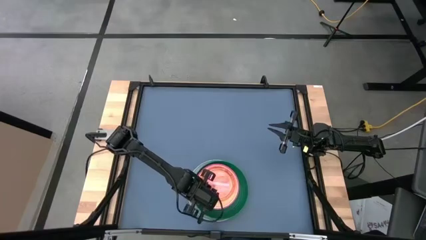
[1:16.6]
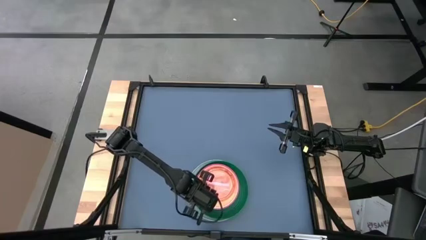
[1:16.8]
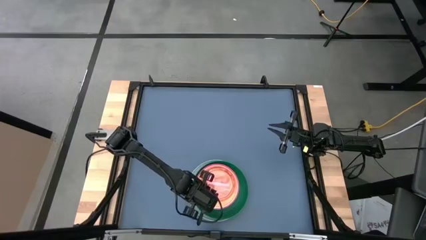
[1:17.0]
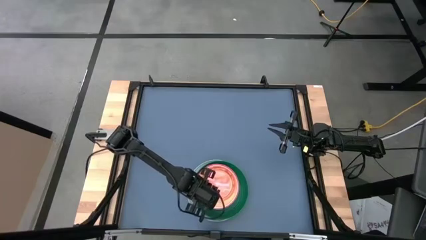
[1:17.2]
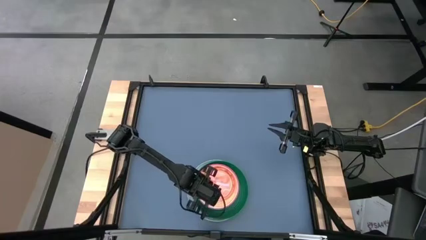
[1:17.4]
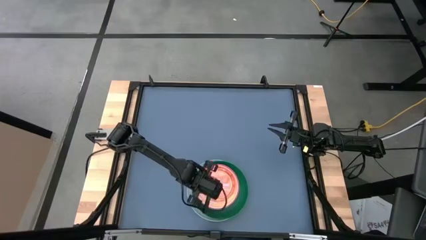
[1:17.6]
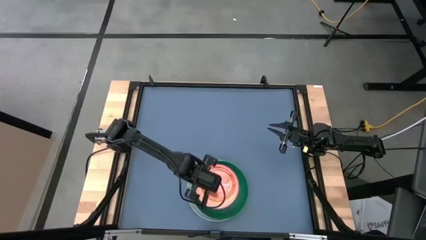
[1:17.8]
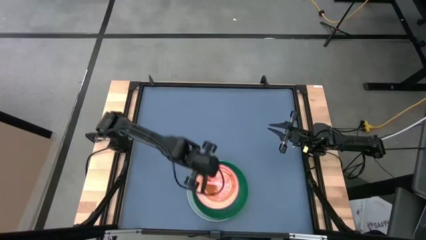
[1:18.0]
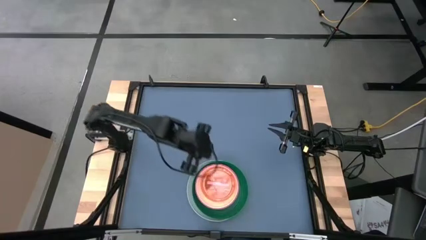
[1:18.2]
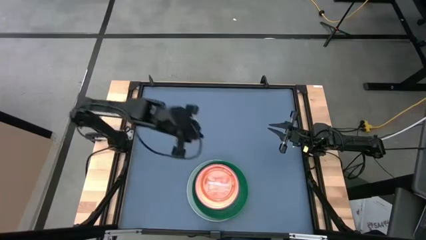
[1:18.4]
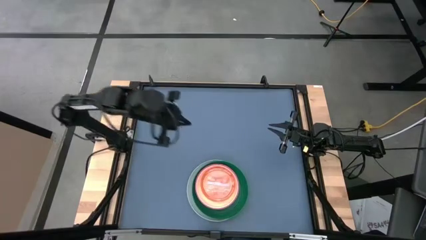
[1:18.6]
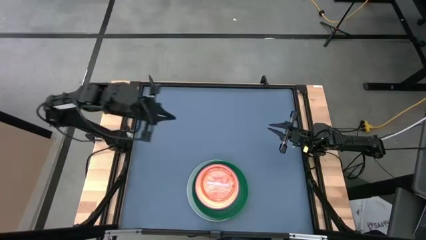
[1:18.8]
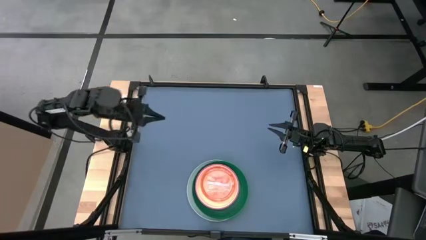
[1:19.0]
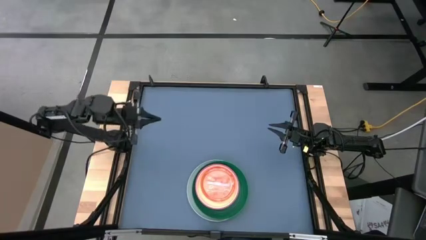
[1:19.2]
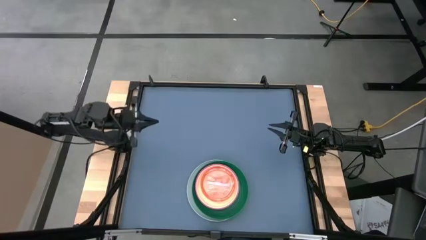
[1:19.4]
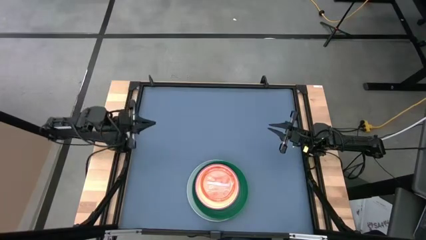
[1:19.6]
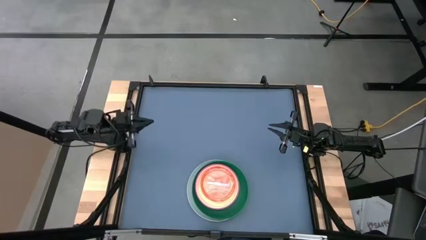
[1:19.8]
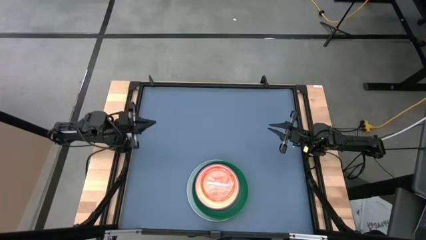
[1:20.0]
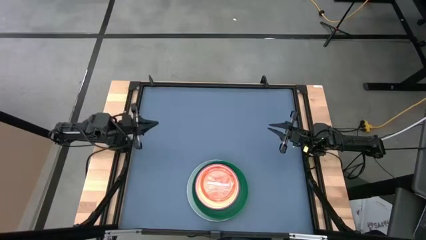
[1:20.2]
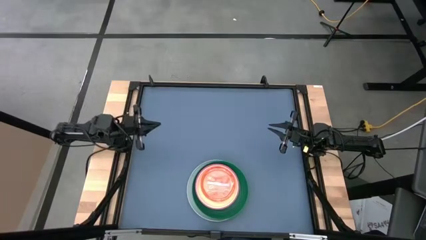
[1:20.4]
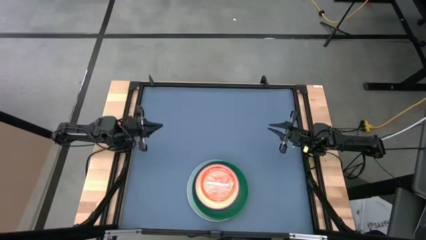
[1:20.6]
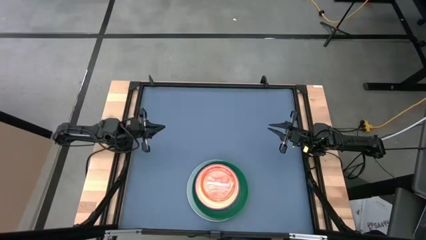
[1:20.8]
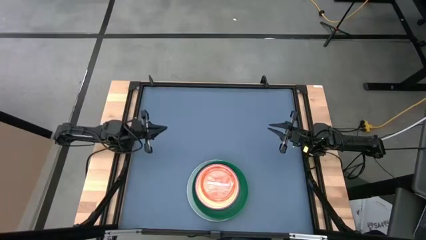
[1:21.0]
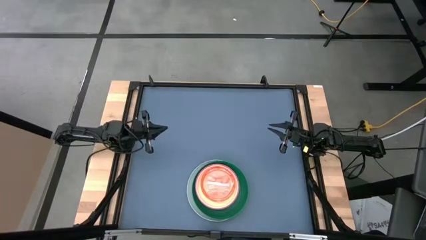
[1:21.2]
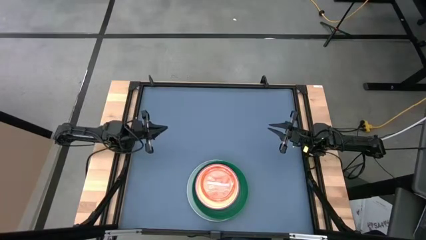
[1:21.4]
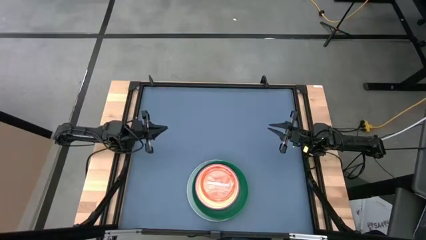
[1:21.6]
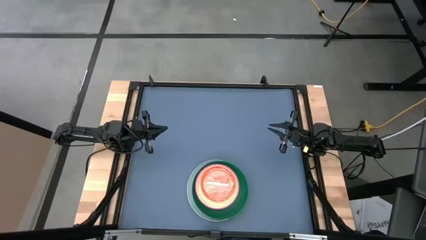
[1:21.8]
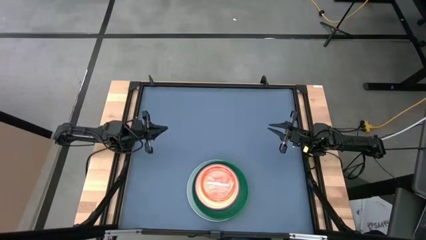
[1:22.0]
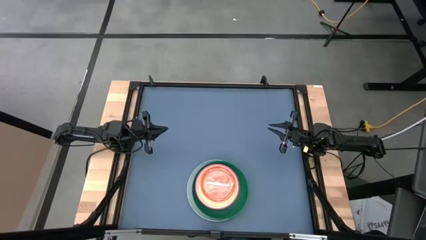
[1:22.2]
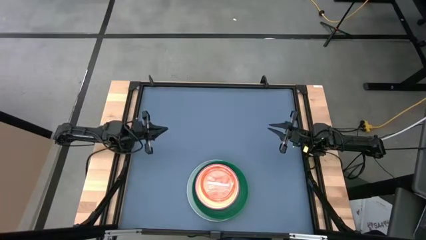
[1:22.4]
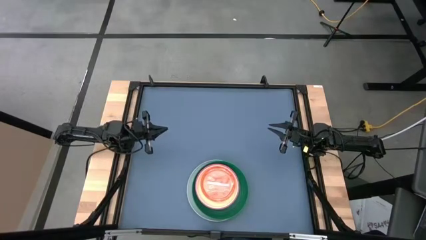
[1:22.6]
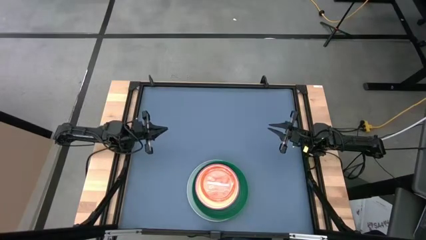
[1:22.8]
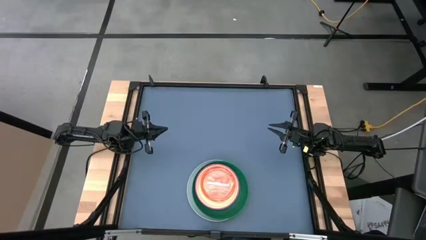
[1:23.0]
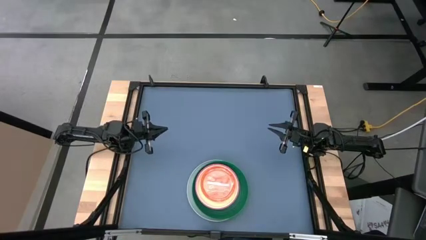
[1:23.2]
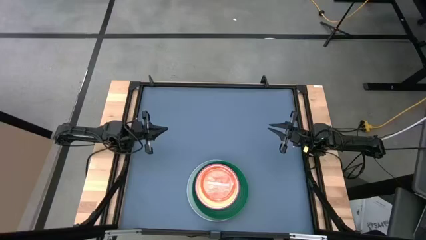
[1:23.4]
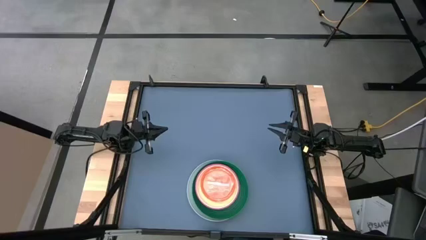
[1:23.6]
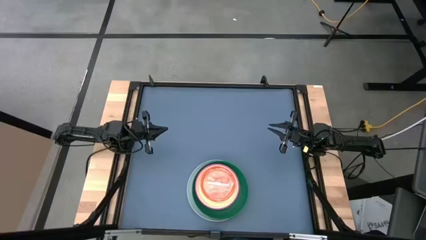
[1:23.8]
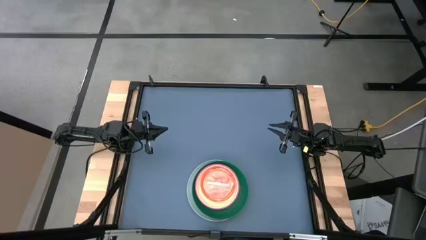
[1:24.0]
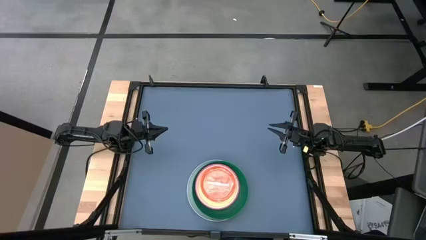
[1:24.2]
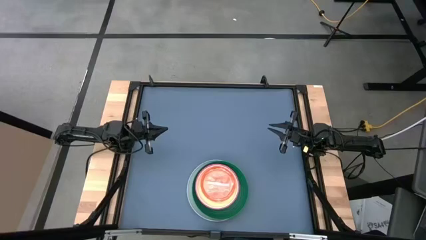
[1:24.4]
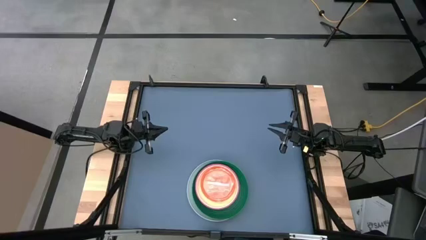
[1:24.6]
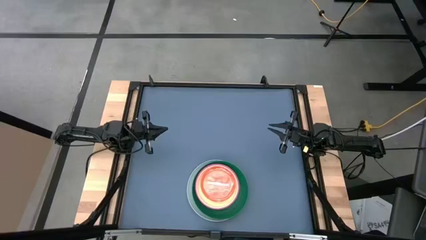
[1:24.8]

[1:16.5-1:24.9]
Task: Stack plastic plates
Return to Home Position

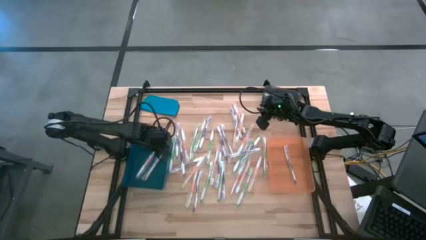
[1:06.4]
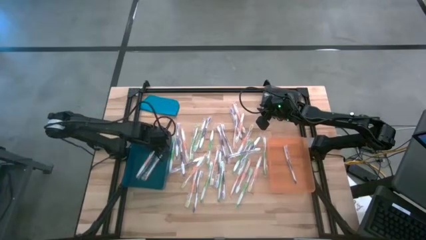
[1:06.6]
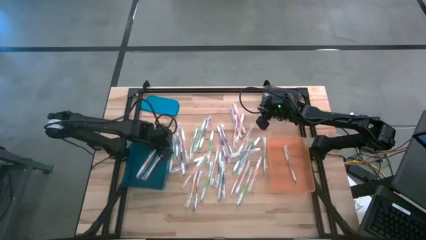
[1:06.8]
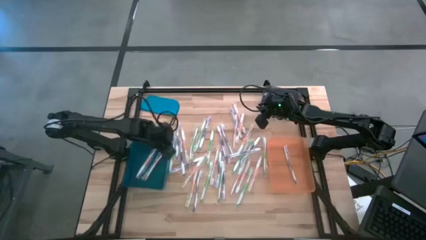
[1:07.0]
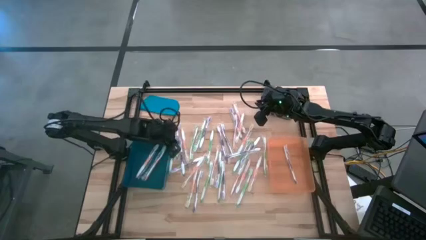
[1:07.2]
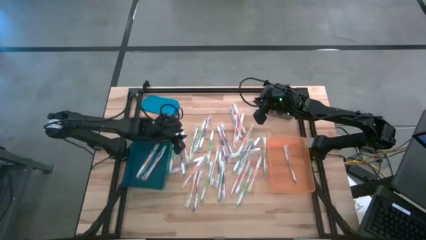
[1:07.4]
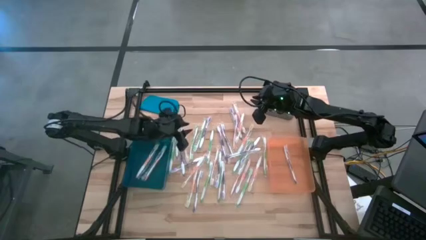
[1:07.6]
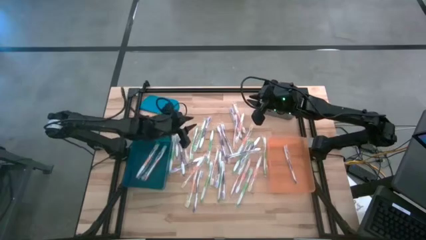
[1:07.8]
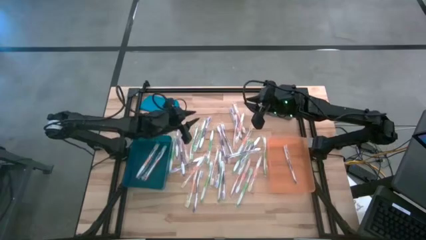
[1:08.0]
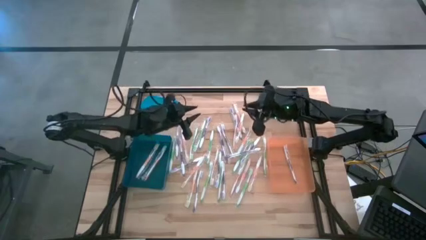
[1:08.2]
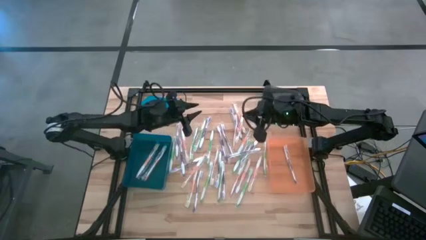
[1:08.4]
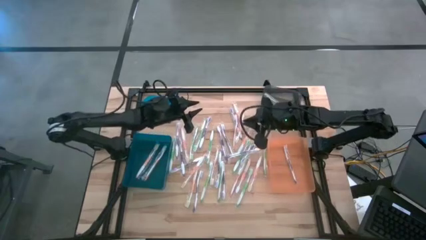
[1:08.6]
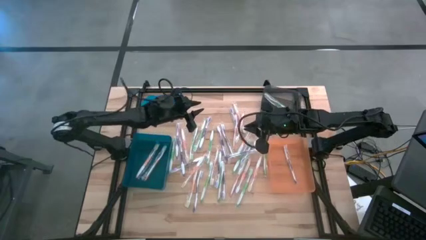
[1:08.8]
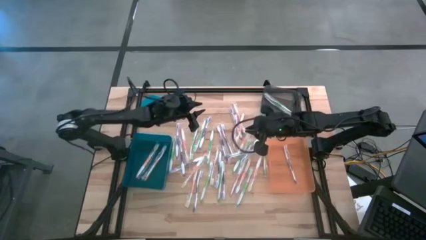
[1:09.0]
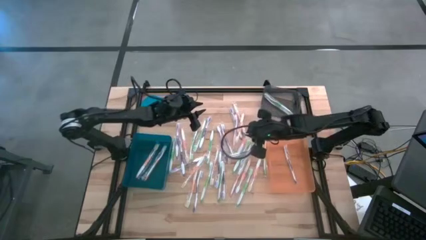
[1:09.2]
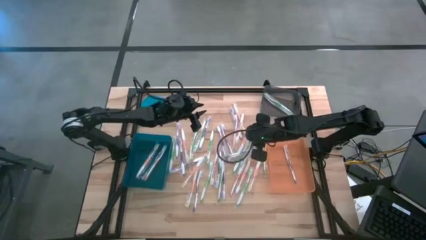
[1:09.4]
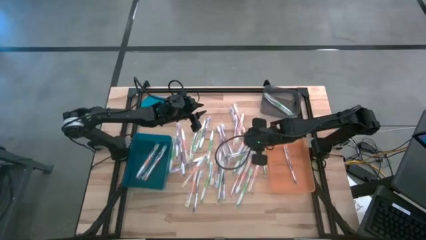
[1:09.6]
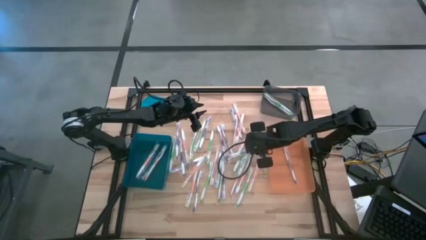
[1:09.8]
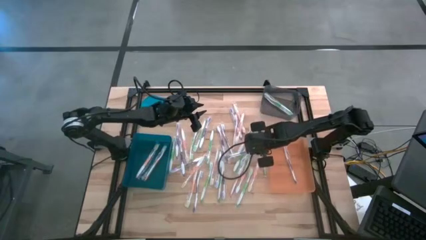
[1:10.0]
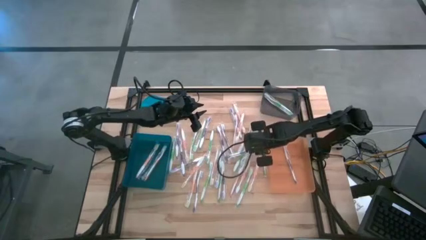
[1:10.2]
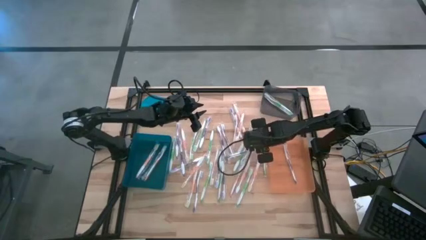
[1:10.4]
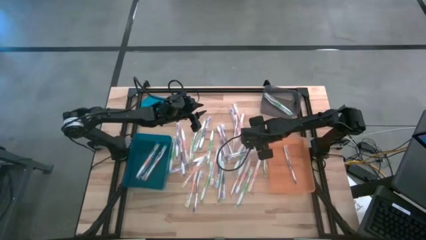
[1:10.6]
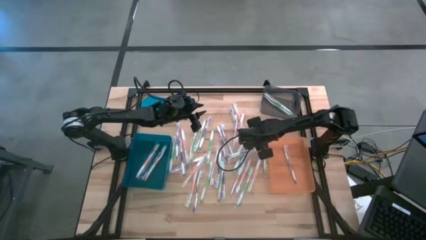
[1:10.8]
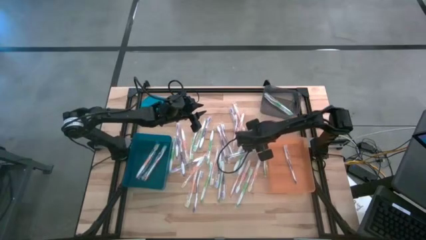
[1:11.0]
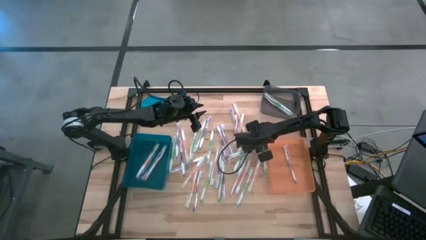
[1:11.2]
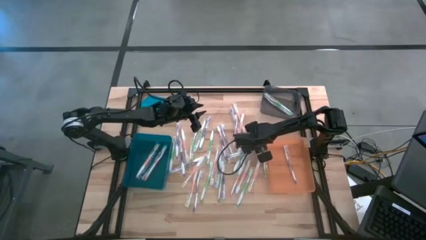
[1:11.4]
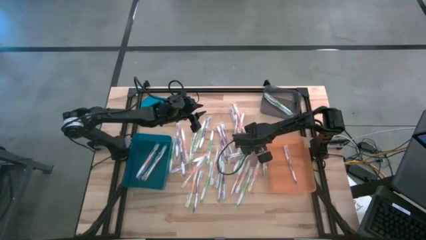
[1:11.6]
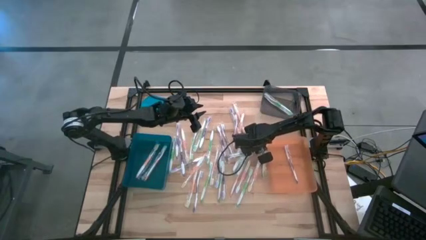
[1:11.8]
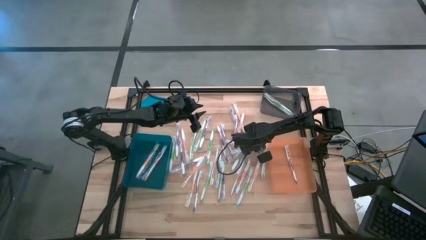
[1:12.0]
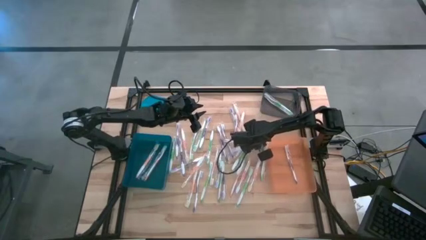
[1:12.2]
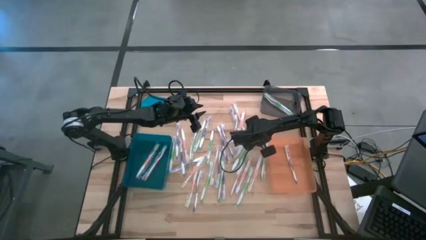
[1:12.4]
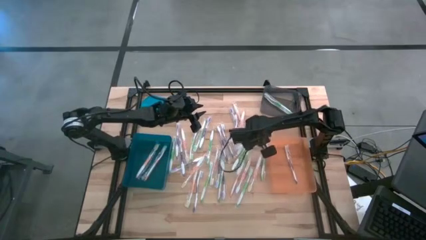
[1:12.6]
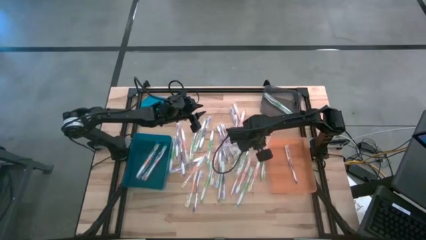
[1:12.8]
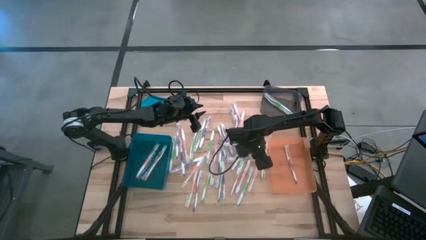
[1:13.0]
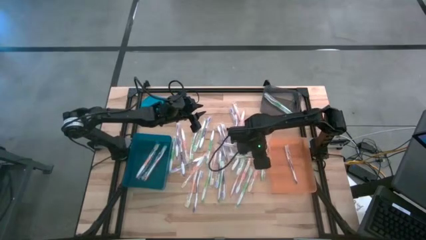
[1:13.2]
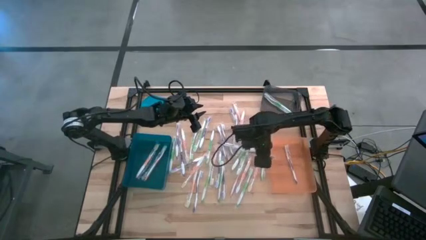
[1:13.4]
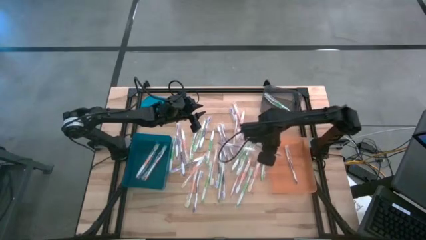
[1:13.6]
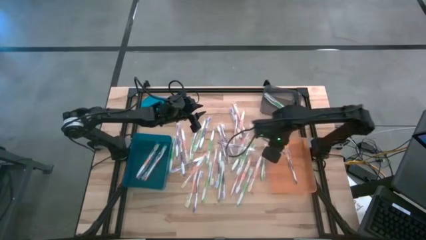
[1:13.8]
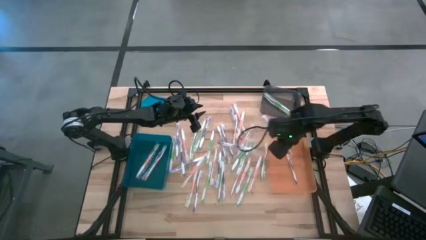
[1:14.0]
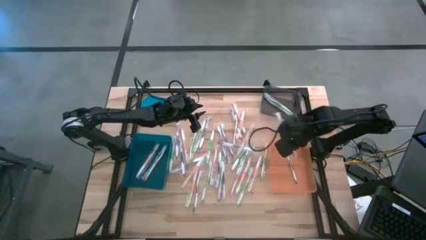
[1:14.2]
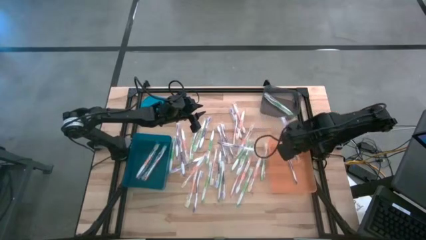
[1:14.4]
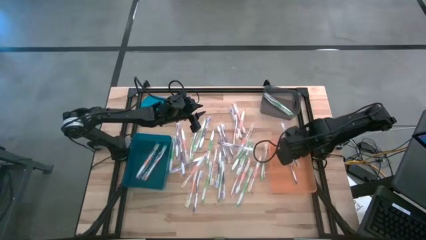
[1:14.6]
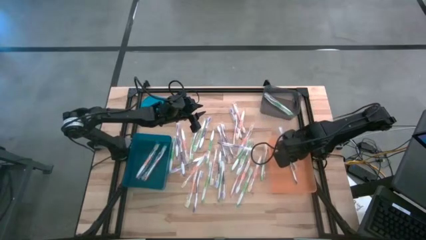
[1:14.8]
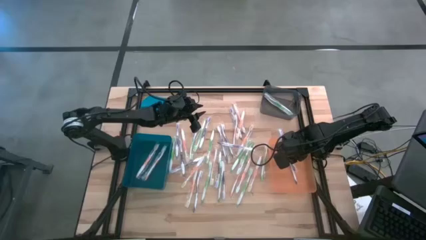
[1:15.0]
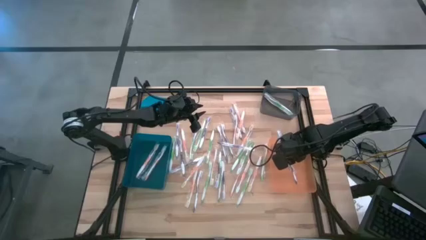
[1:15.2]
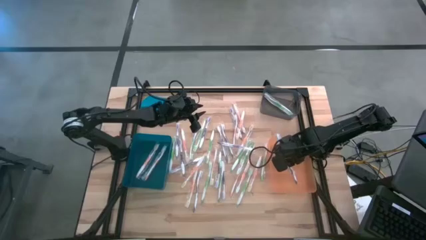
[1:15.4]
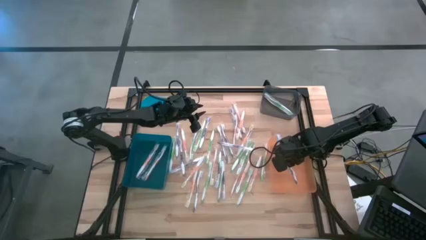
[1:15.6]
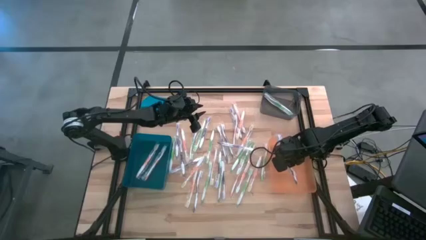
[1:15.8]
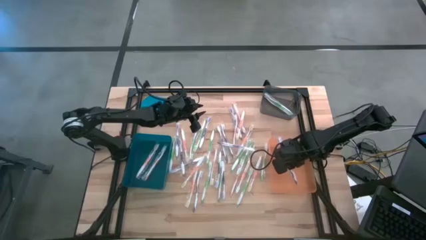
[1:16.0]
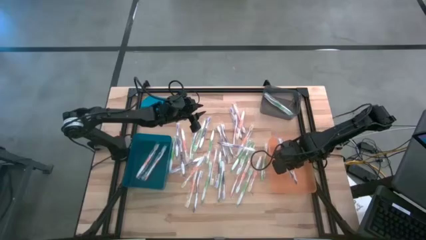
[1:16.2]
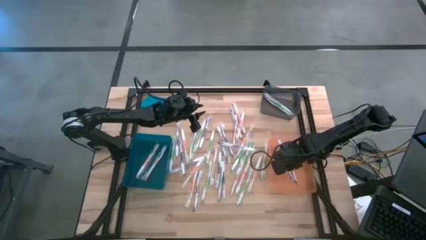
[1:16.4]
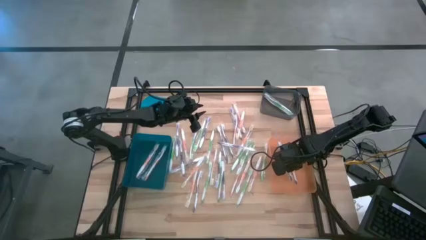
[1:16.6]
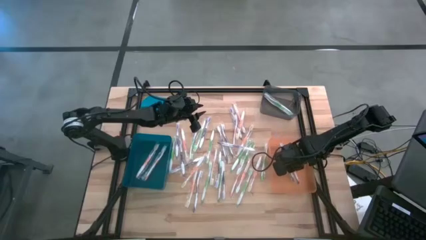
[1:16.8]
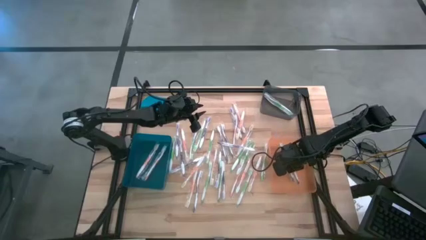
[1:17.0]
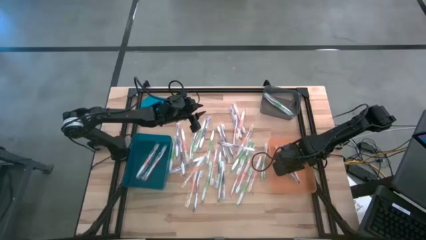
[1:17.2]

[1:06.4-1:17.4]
Task: Pick & Place Toothbrushes
Put the purple toothbrush into the orange bin
